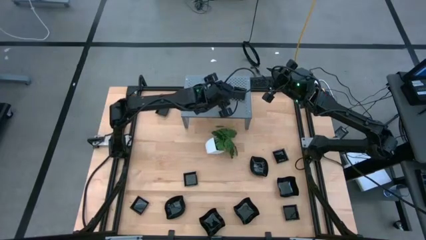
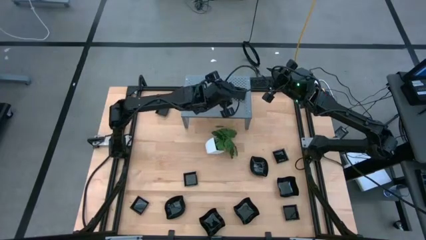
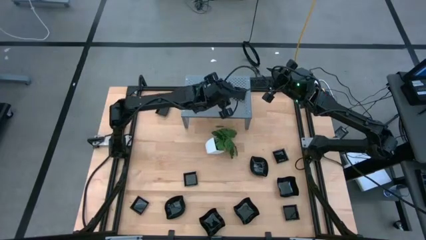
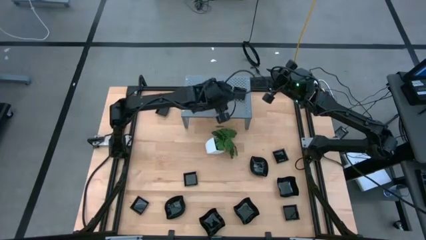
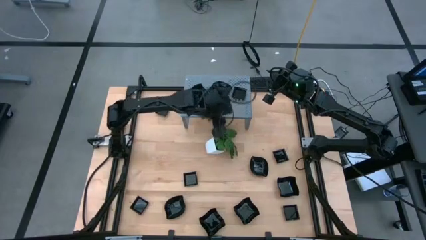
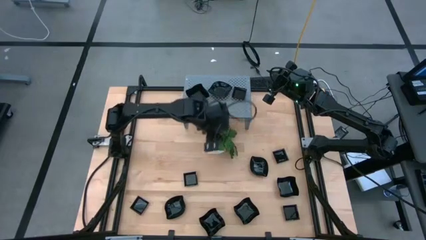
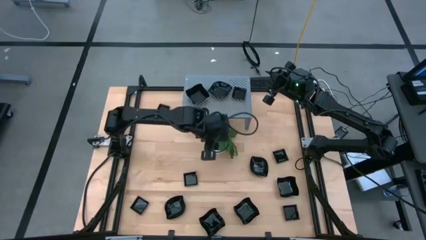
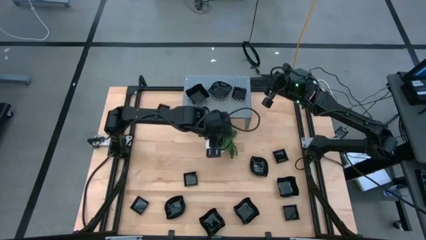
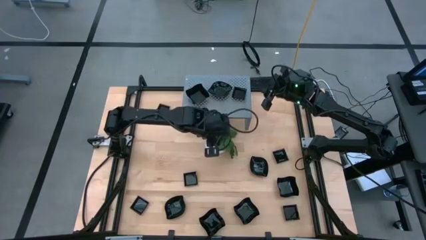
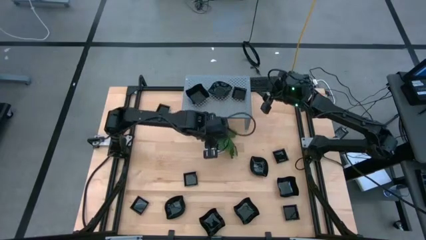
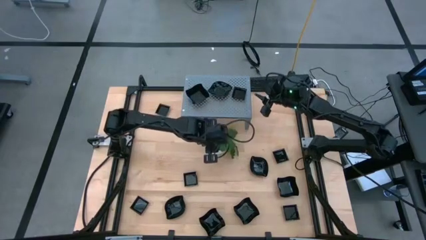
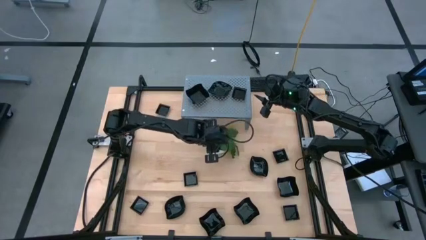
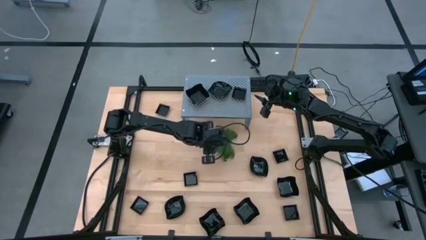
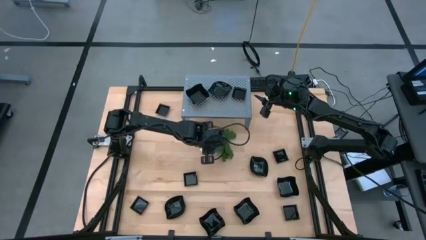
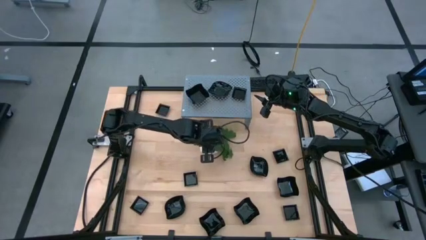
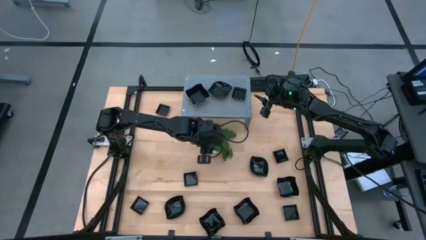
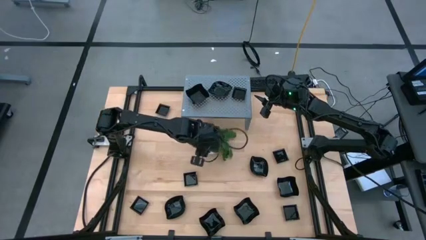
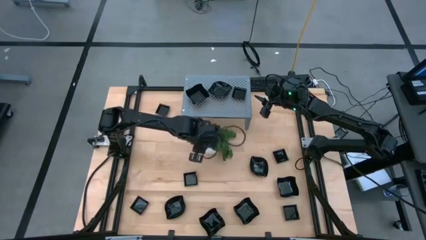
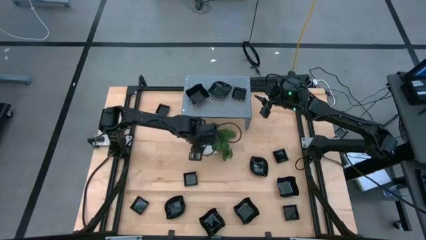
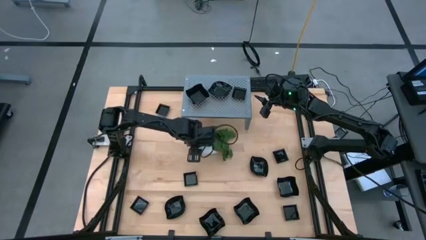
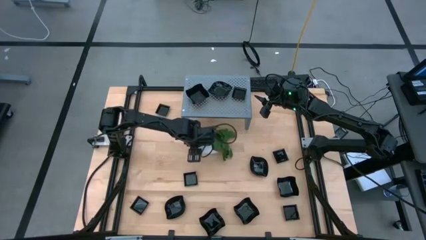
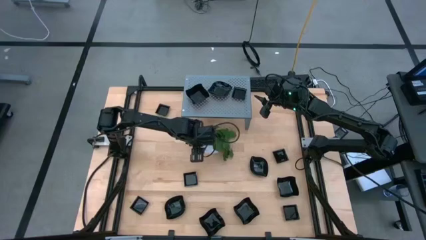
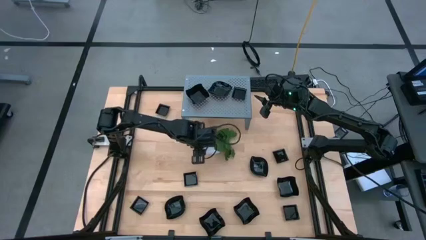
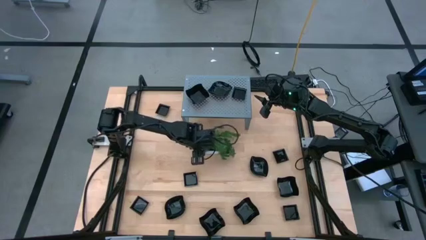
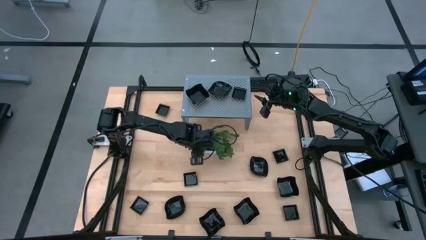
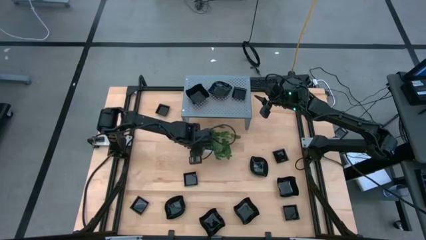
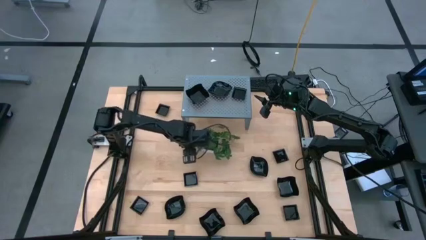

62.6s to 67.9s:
Task: Pick & Place Mini shaped plates
Adjust the plant on the table

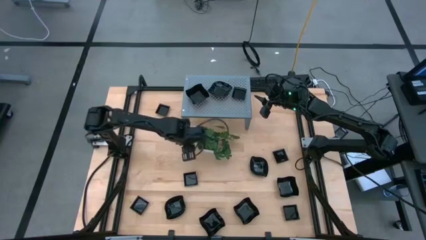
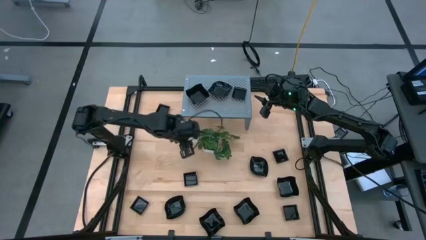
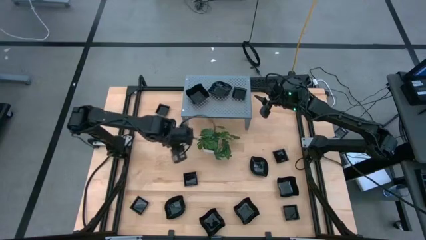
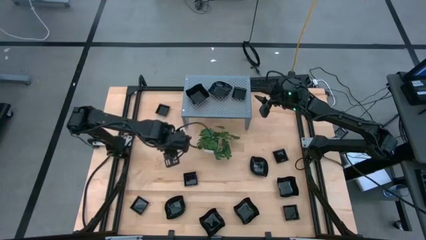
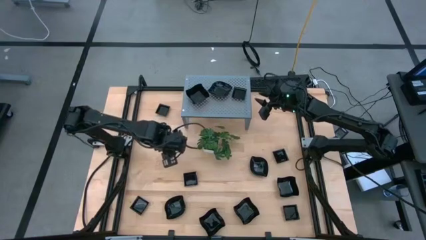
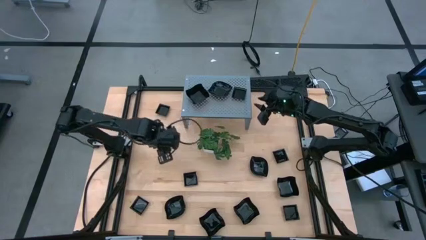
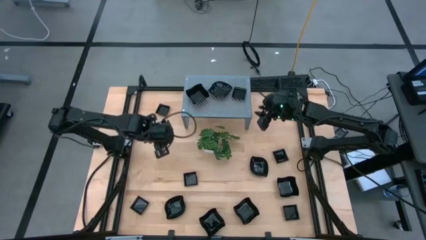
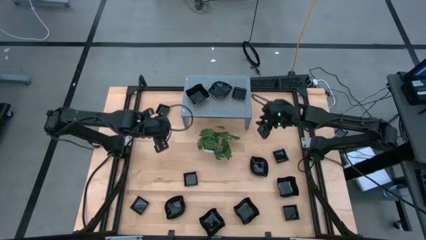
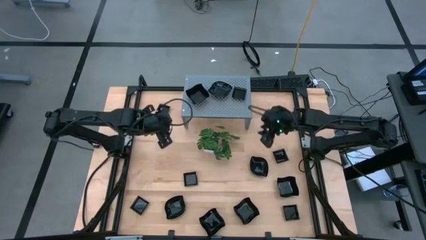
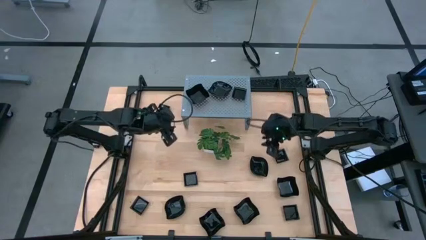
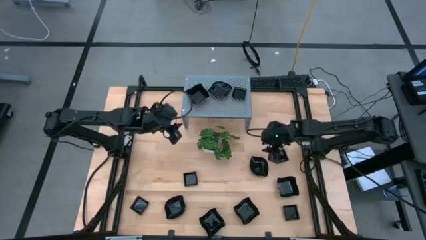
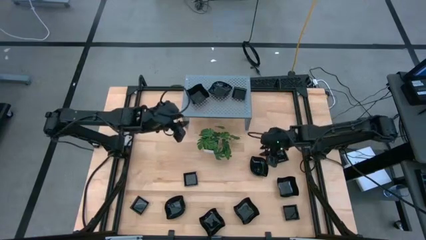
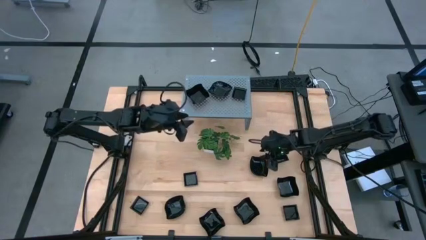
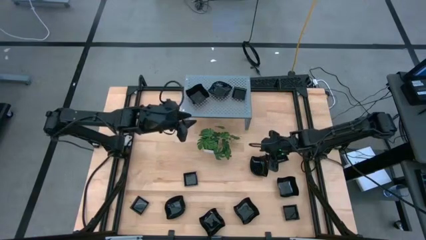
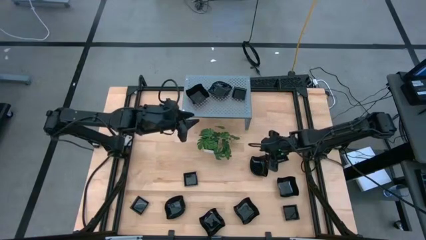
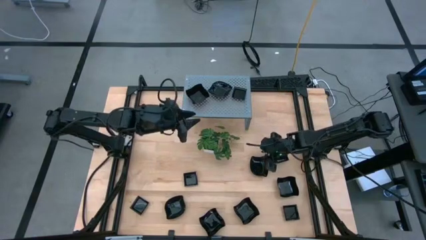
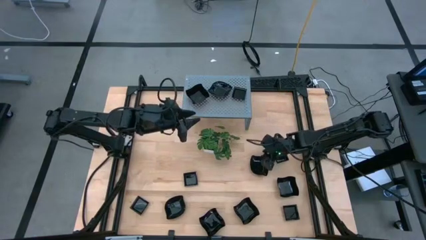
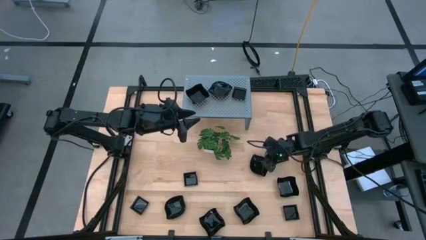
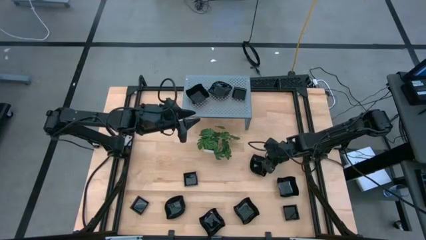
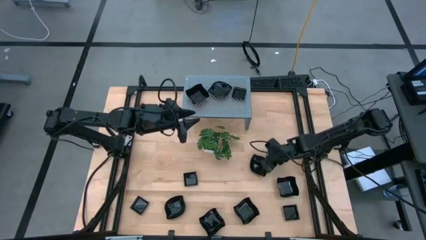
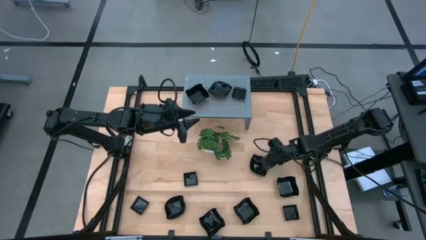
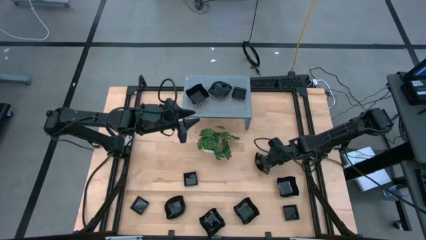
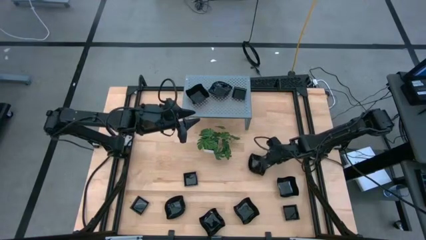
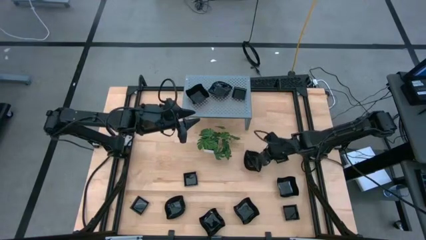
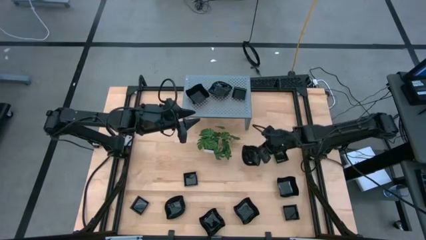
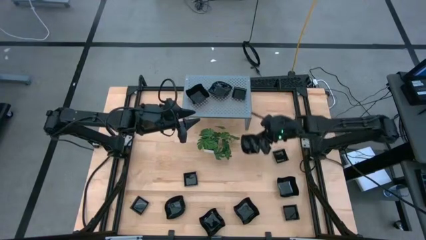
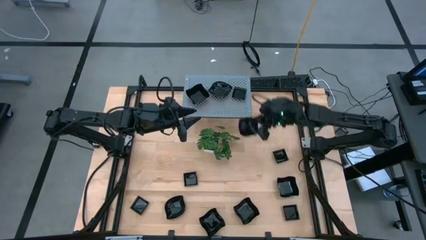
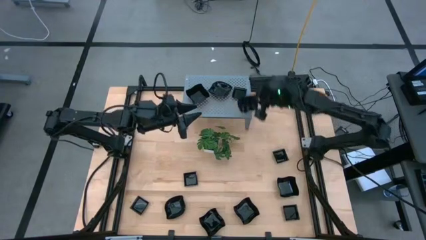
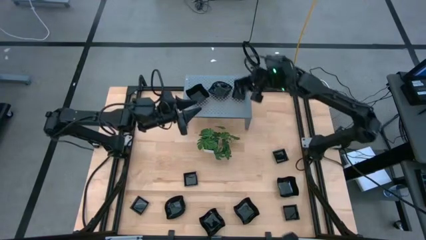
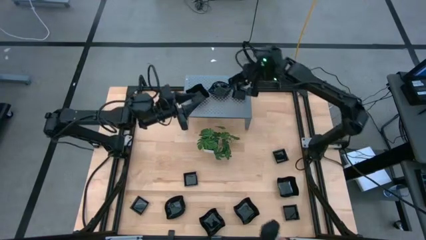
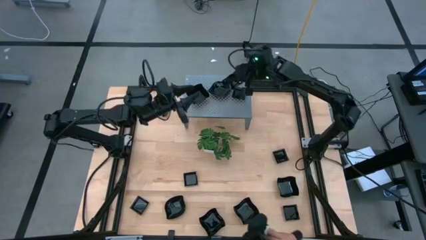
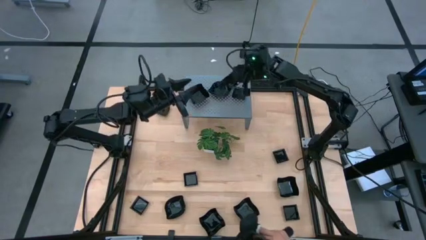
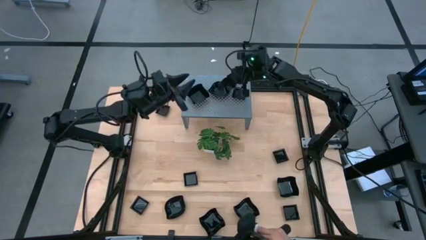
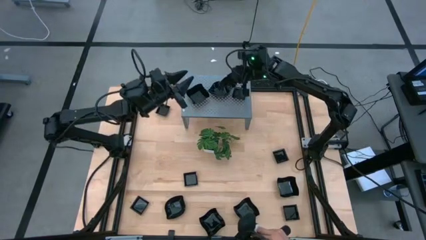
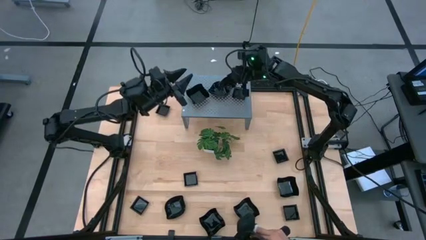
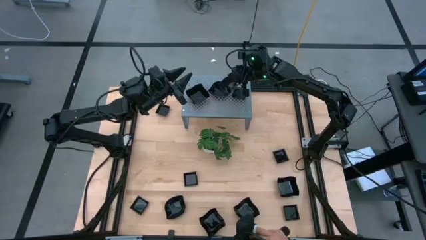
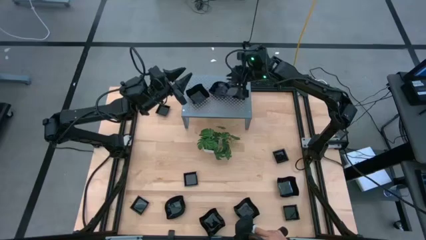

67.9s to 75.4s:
Stack the leaf-shaped plate on top of the stacked leaf-shaped plates on the shelf

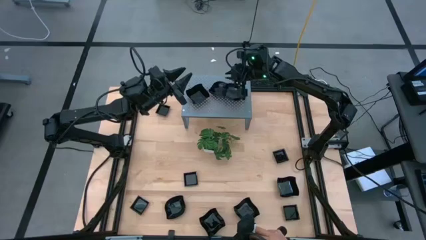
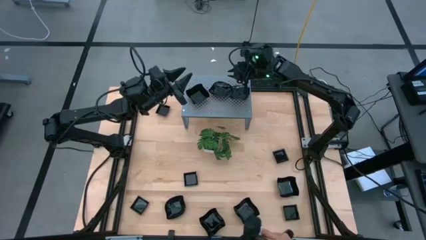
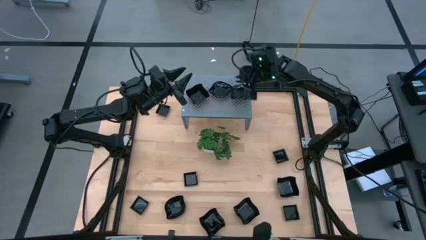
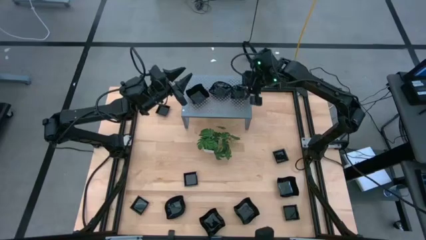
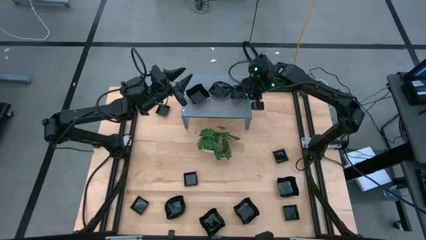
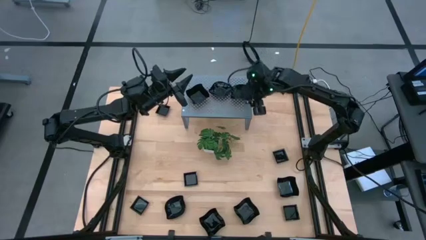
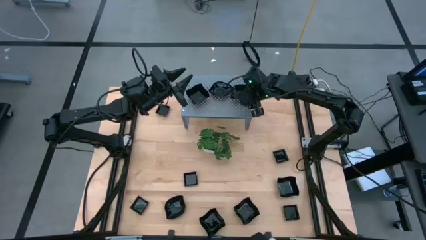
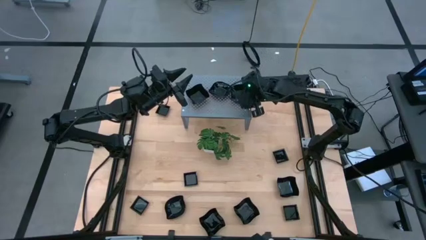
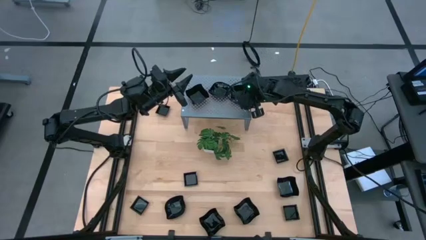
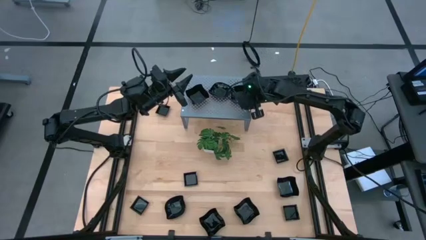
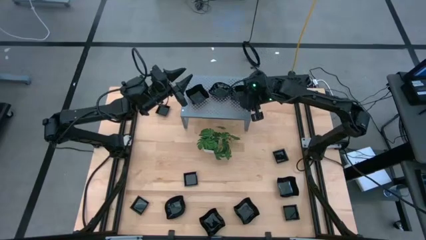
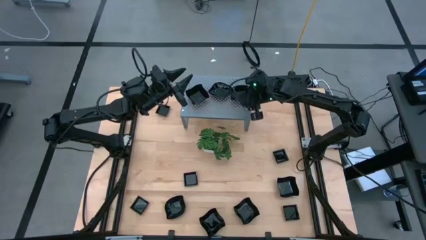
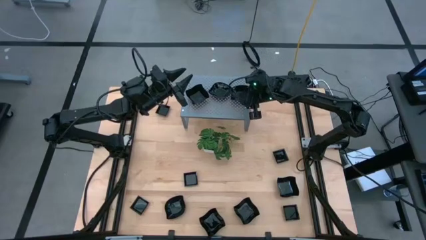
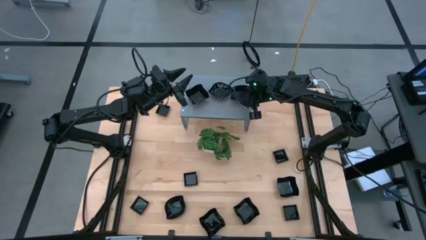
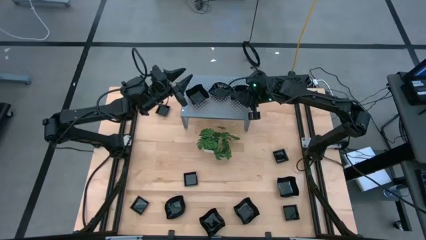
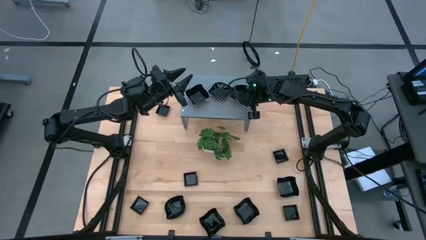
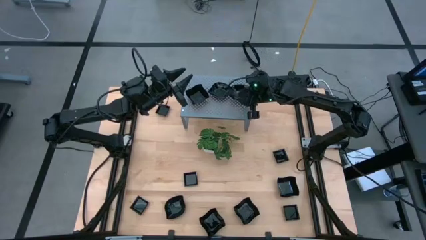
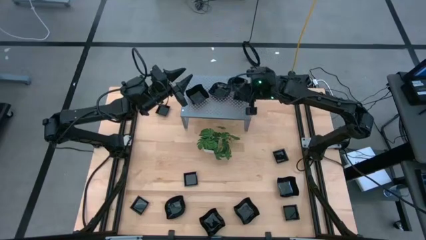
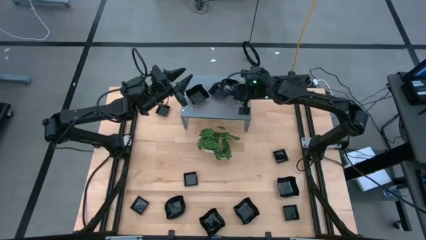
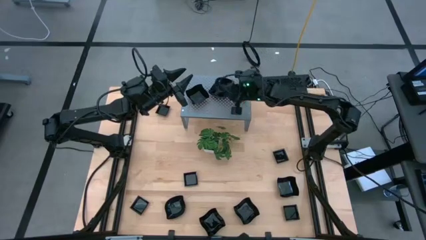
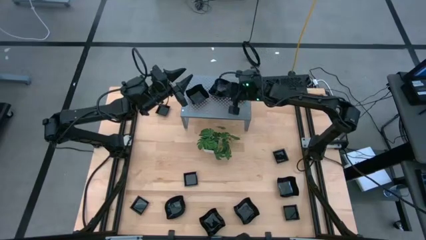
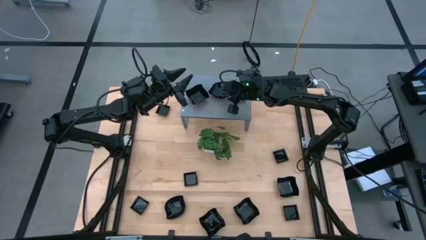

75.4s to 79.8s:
Stack the leaf-shaped plate on top of the stacked leaf-shaped plates on the shelf
